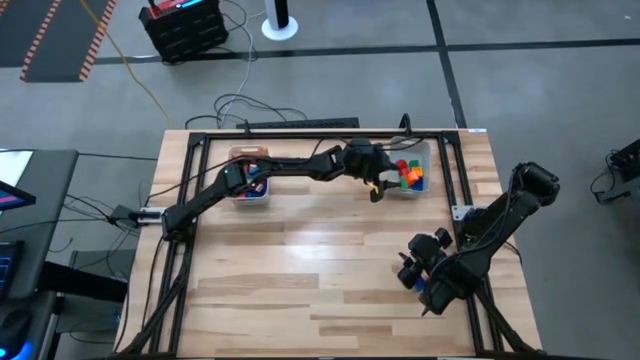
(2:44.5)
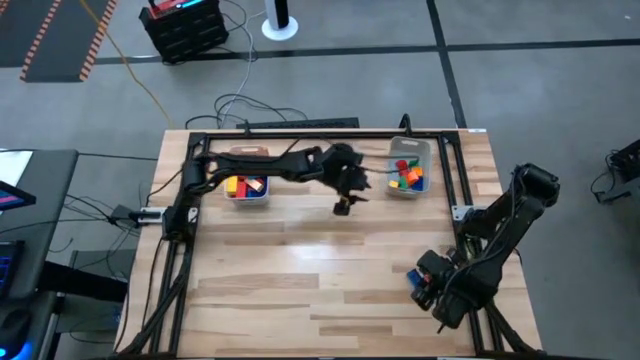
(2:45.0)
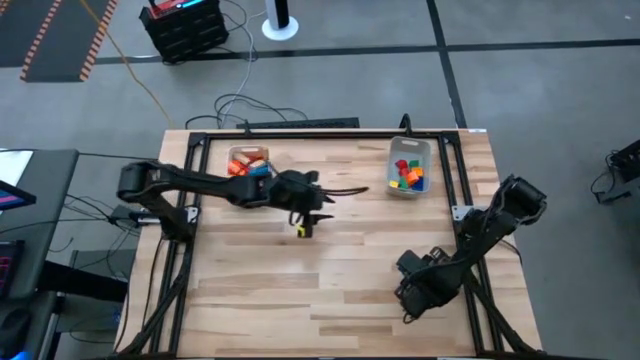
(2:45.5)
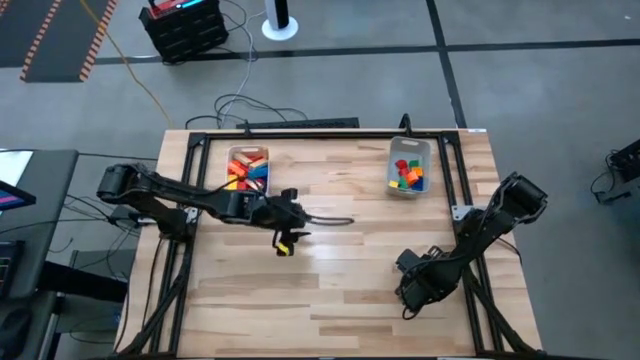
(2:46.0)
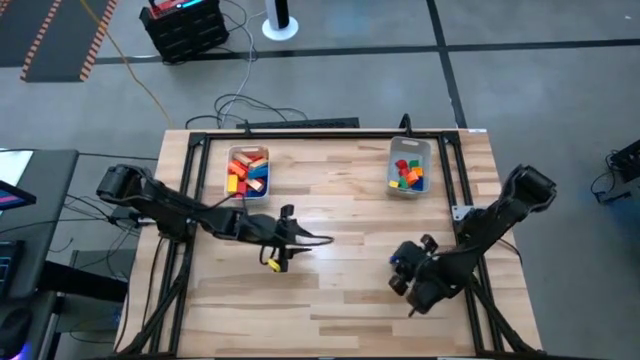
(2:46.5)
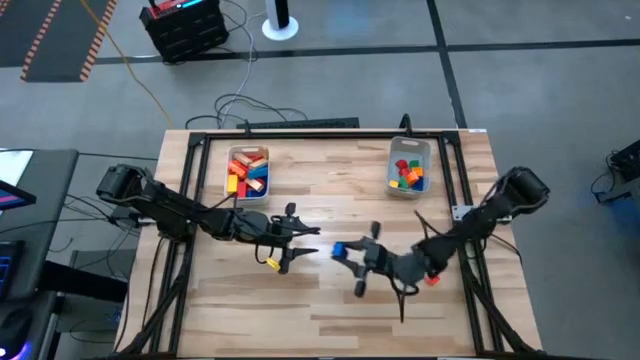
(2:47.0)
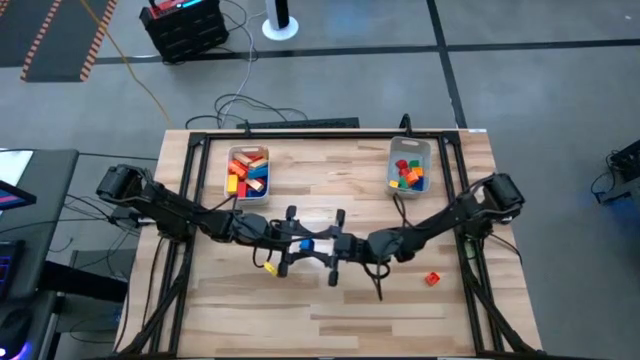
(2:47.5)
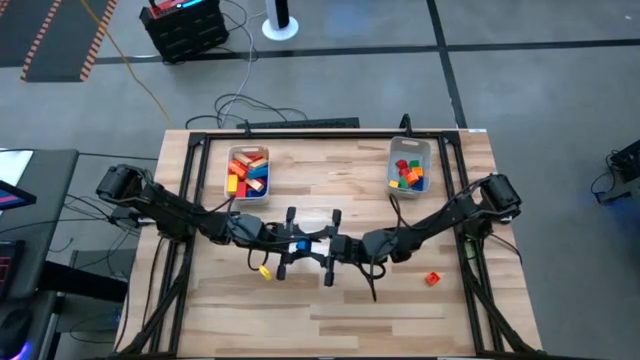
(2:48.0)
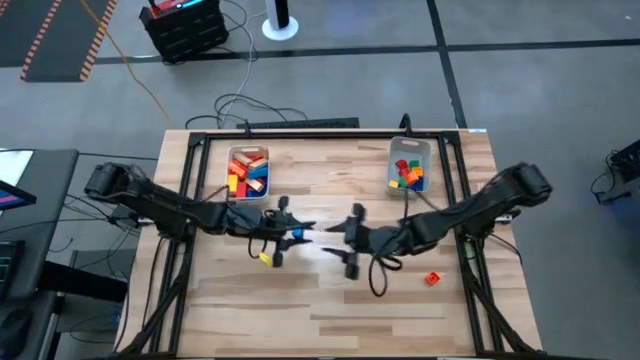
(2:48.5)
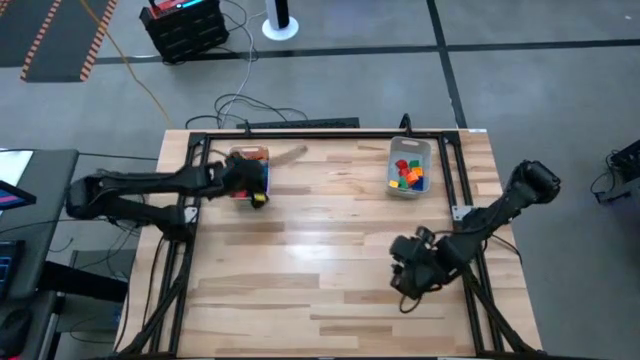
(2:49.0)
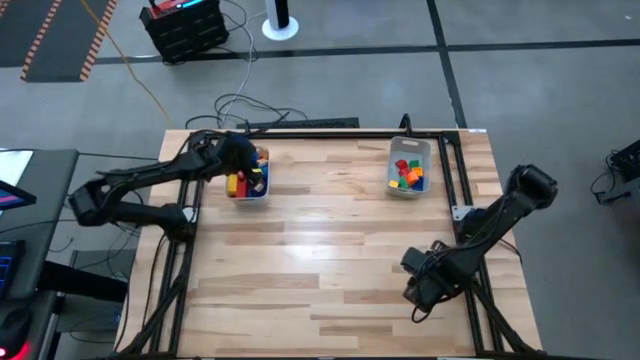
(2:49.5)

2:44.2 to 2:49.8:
Task: Sort blocks by size
Put the large blue game piece into the white bin

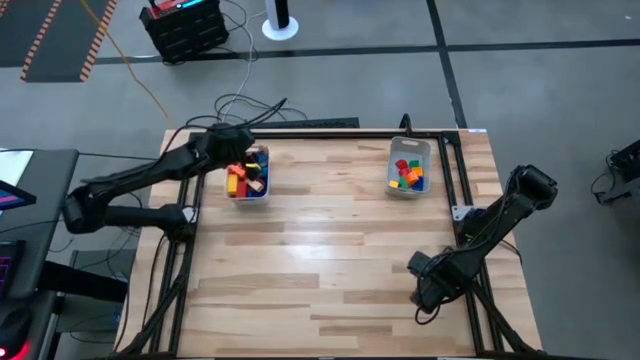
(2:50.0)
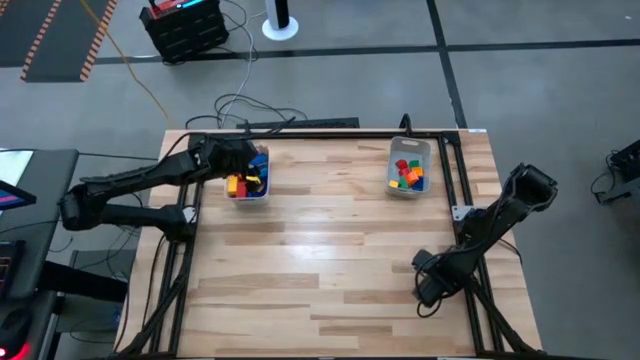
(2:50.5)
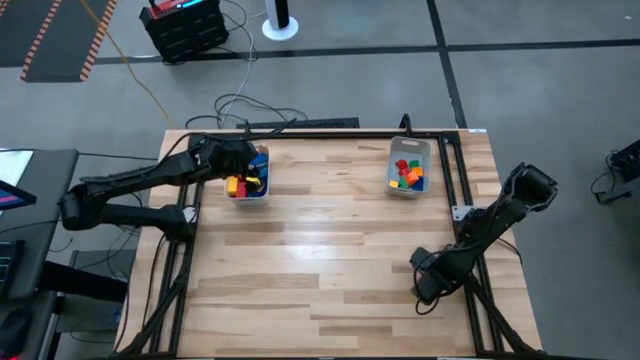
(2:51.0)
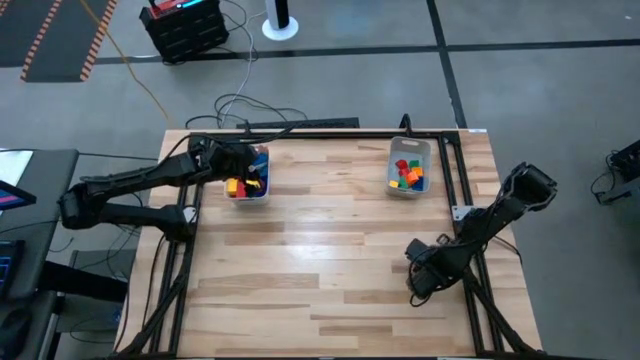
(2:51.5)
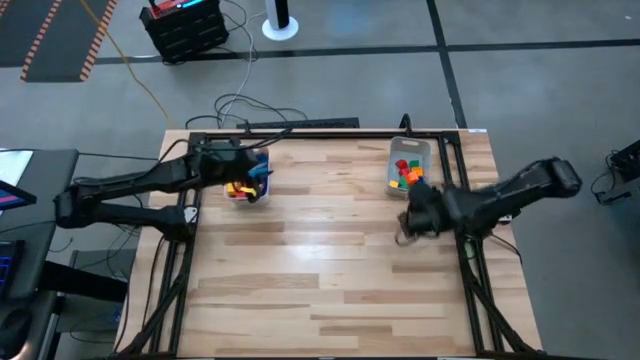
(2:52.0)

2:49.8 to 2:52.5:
Put the small orange game piece into the gray bin

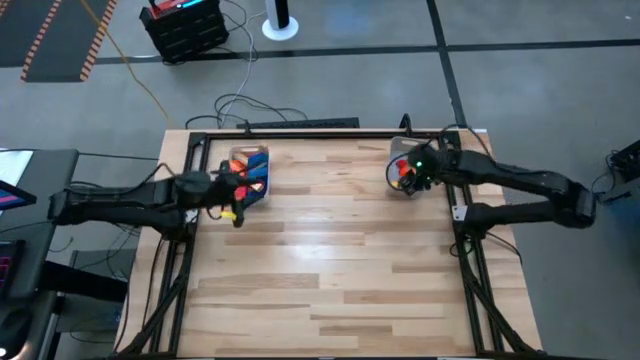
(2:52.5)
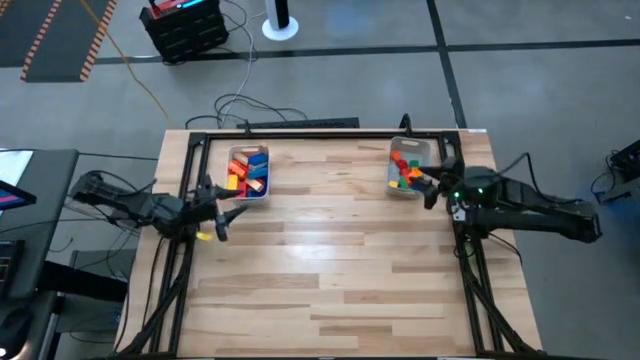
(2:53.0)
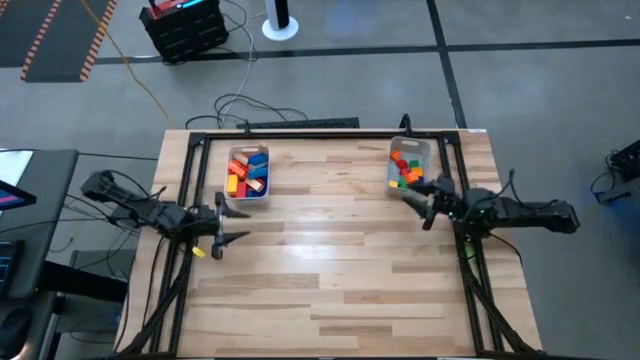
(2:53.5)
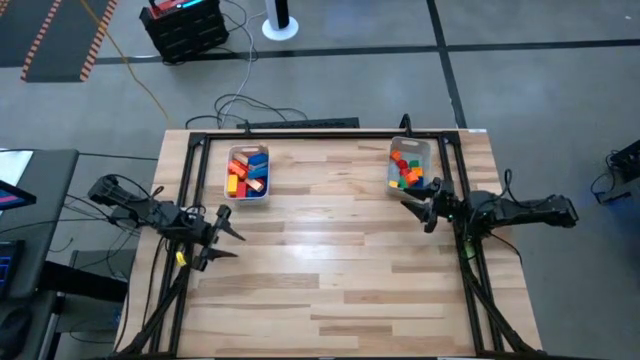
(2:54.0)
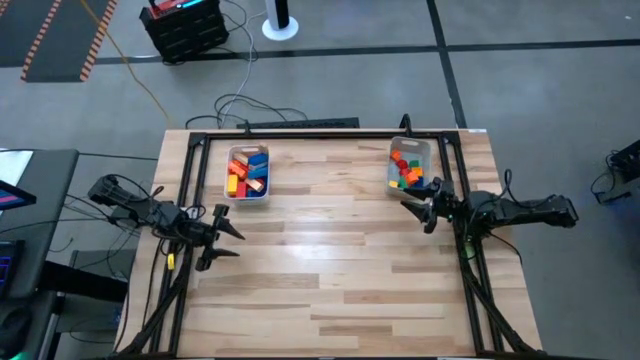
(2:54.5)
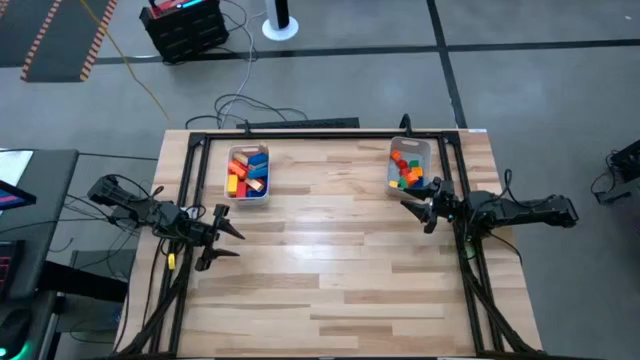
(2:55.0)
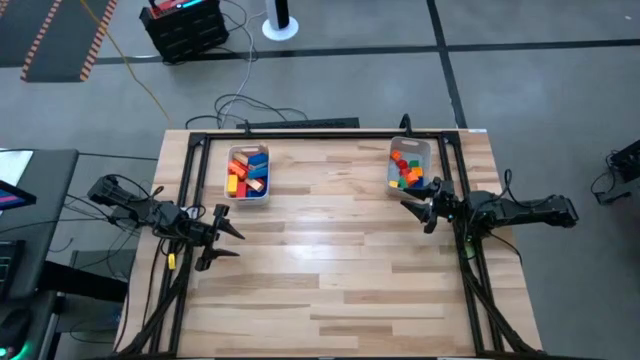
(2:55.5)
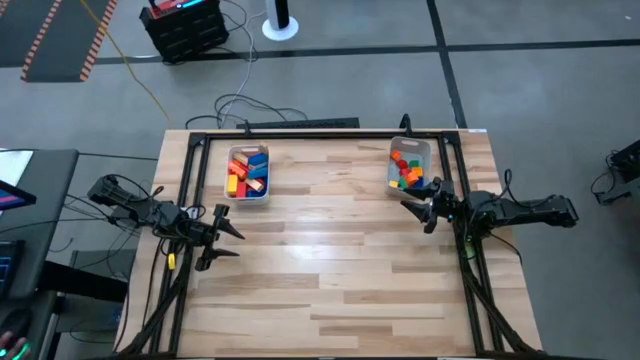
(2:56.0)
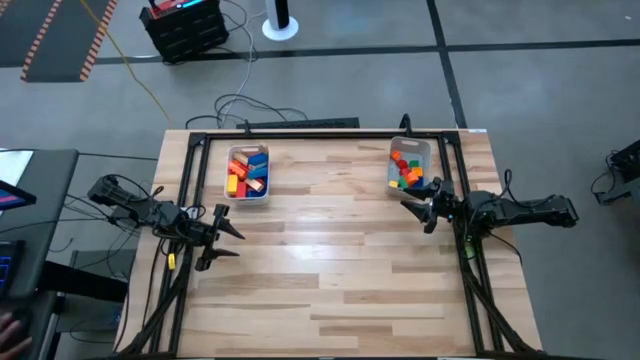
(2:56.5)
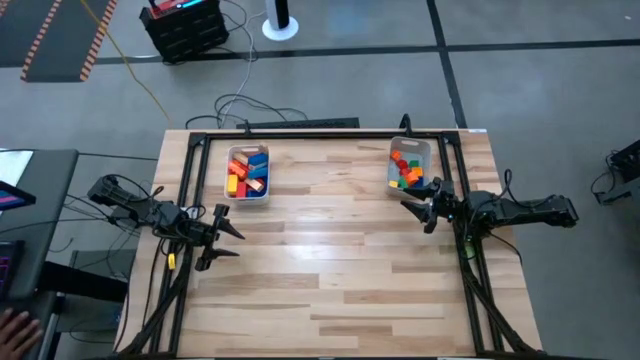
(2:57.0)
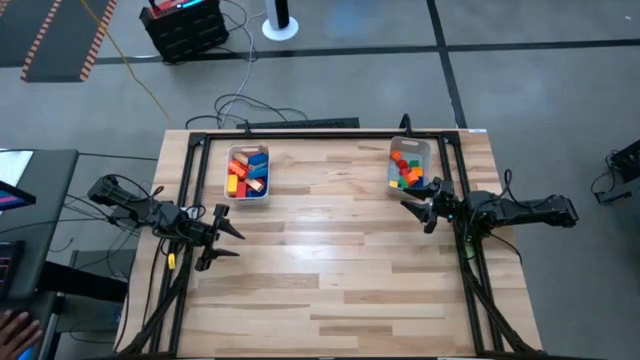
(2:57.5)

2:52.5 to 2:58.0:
Return to Home Position

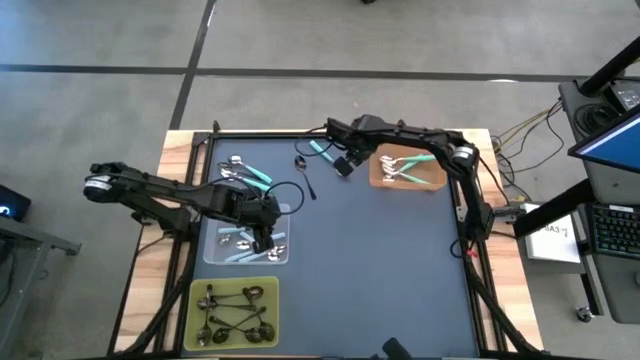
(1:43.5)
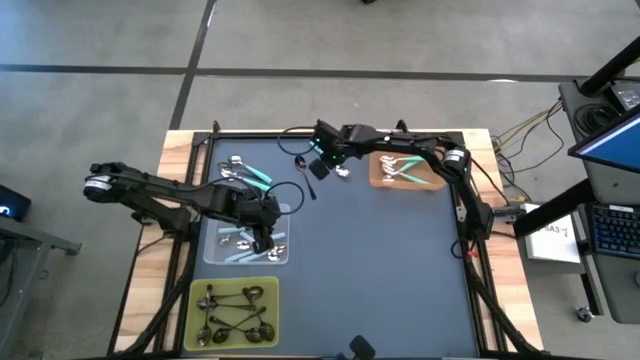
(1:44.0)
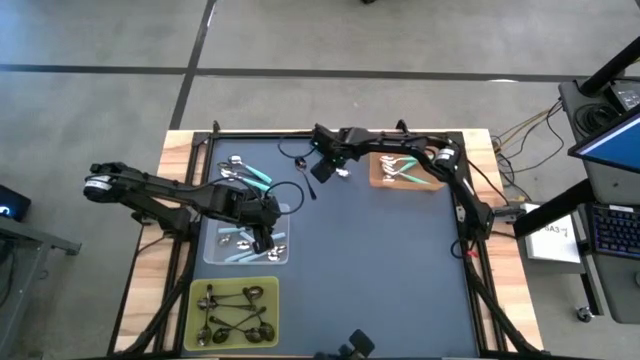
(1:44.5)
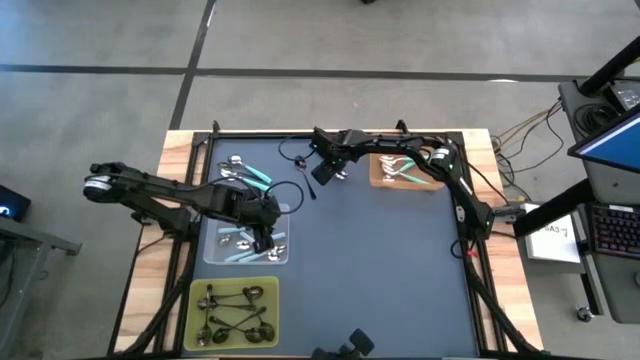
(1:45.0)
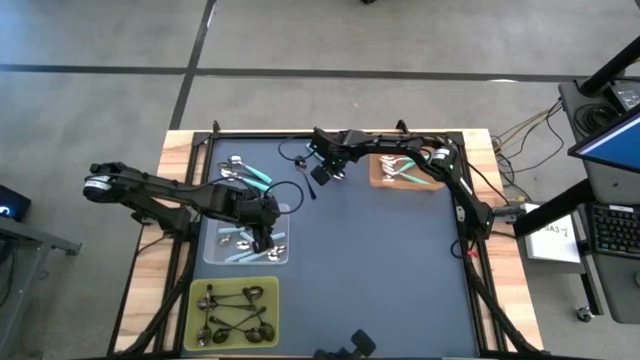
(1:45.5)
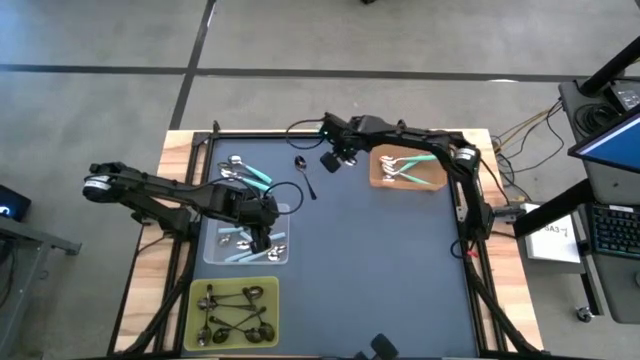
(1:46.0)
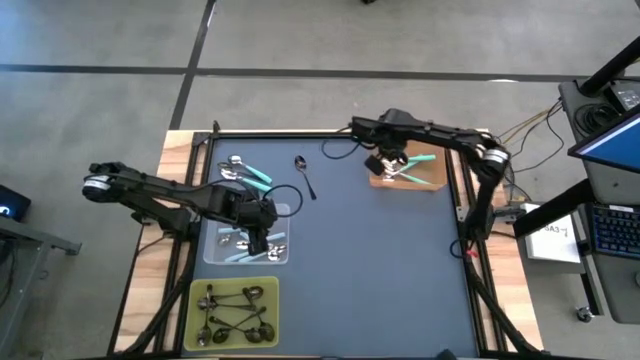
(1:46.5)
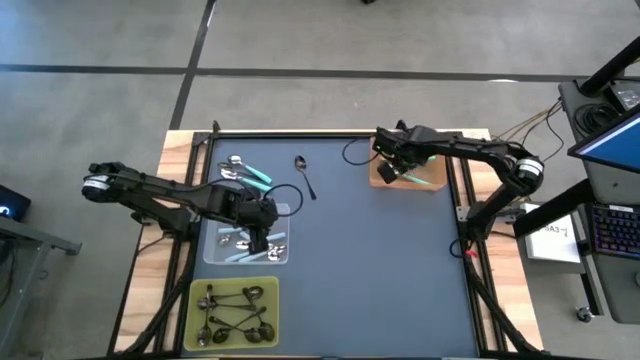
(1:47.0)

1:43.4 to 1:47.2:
Task: Sort silverware by color (type)
Adjust the orange bin
